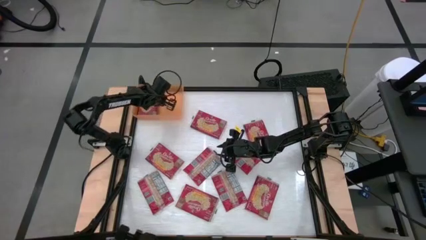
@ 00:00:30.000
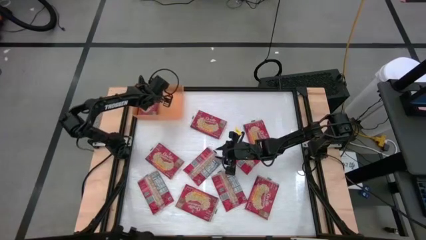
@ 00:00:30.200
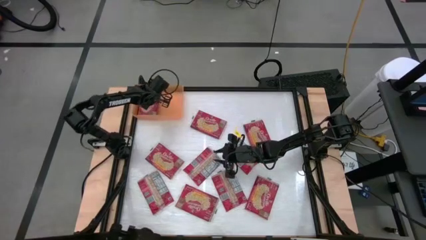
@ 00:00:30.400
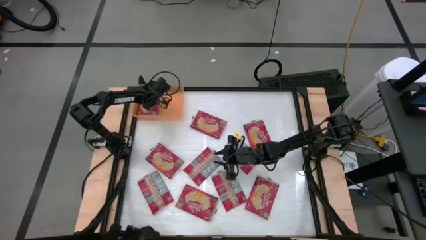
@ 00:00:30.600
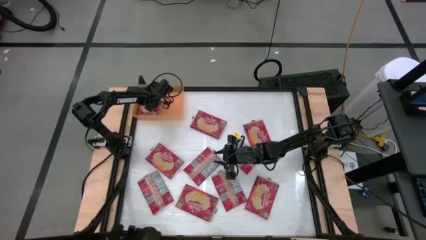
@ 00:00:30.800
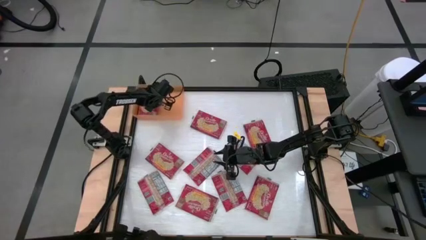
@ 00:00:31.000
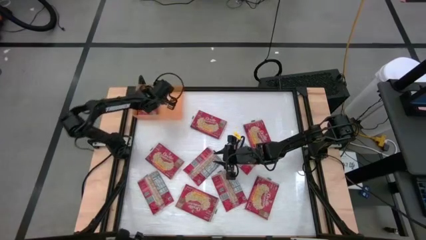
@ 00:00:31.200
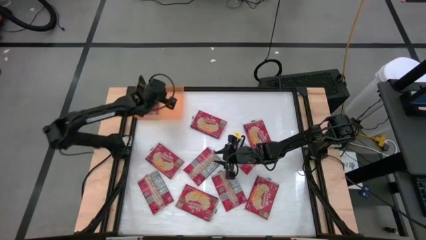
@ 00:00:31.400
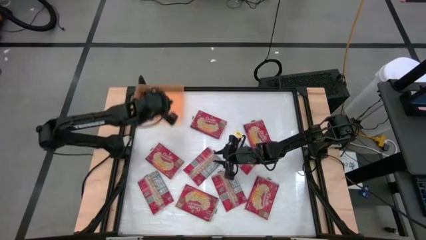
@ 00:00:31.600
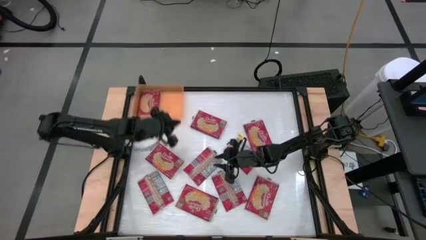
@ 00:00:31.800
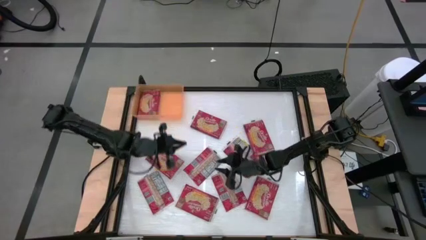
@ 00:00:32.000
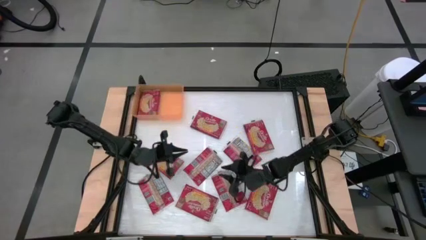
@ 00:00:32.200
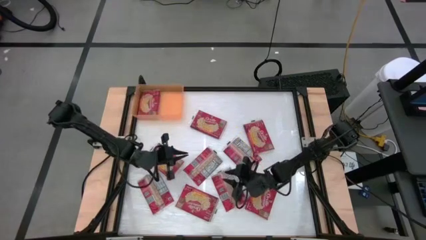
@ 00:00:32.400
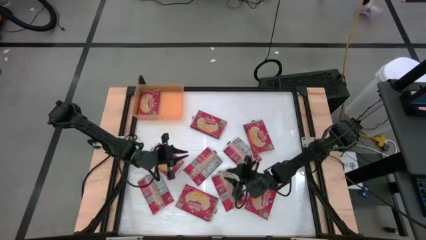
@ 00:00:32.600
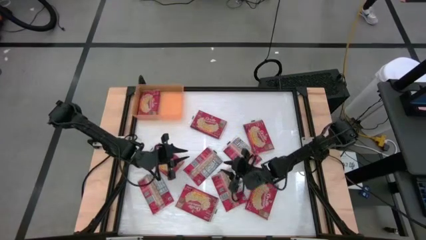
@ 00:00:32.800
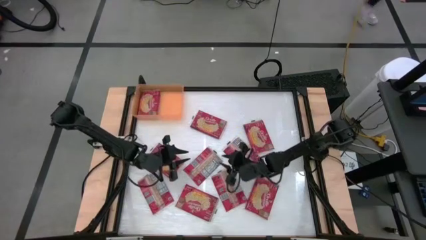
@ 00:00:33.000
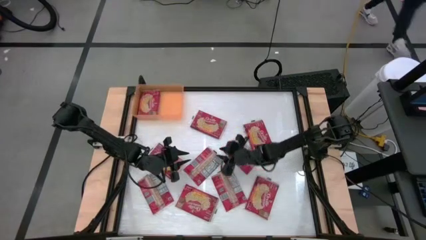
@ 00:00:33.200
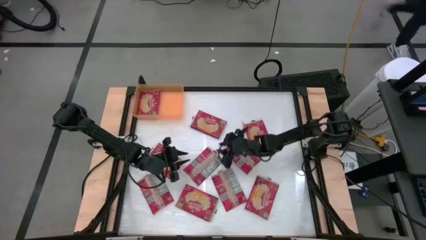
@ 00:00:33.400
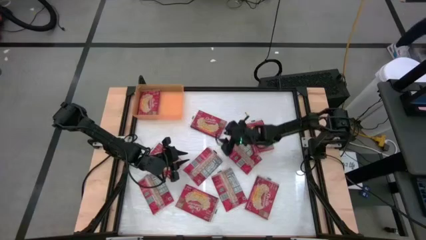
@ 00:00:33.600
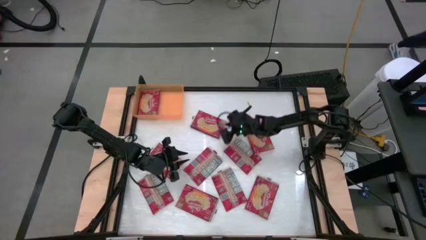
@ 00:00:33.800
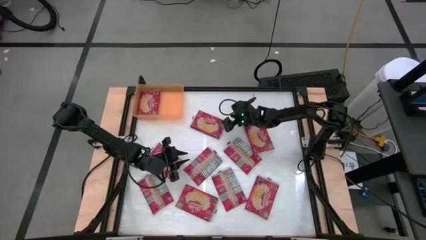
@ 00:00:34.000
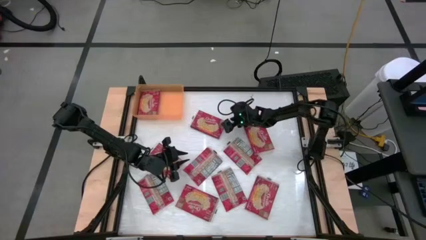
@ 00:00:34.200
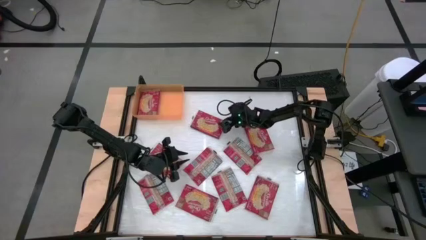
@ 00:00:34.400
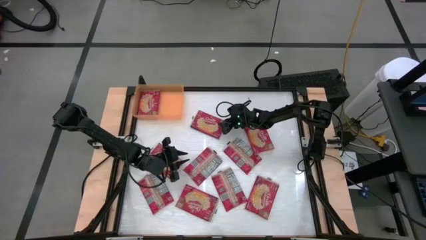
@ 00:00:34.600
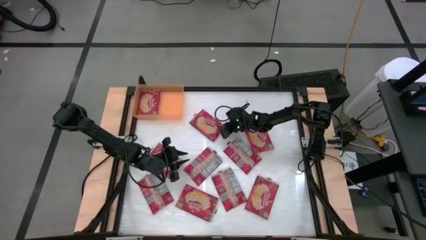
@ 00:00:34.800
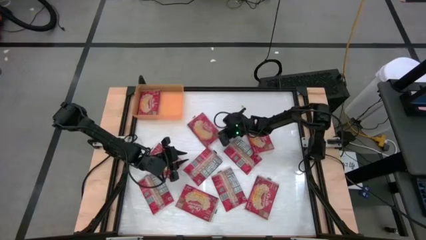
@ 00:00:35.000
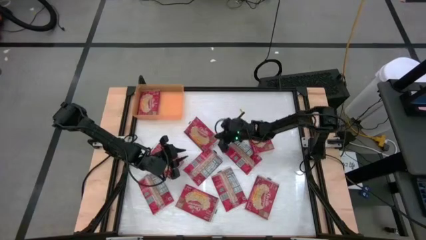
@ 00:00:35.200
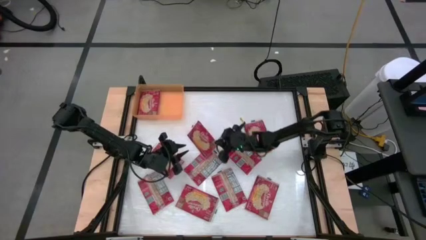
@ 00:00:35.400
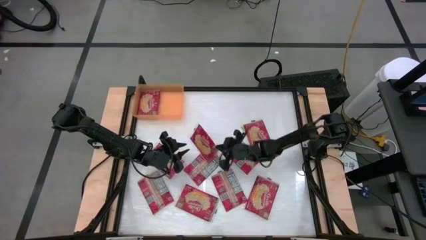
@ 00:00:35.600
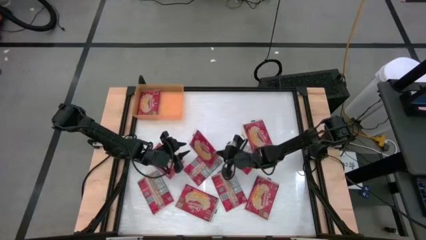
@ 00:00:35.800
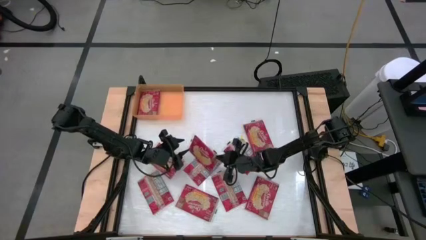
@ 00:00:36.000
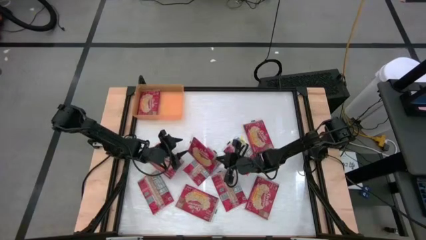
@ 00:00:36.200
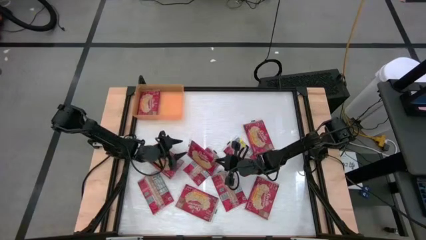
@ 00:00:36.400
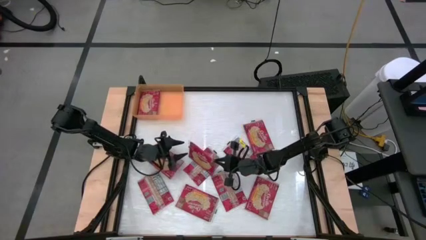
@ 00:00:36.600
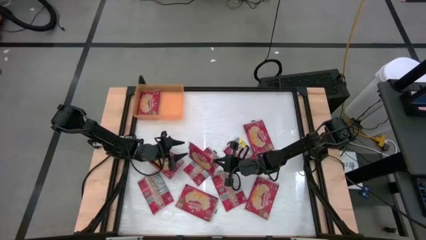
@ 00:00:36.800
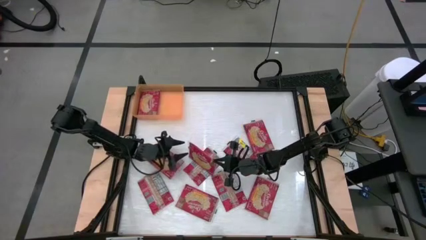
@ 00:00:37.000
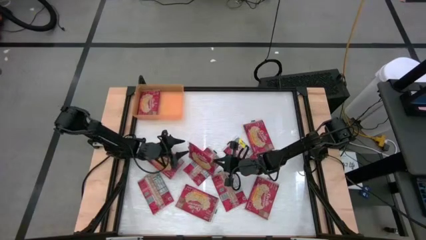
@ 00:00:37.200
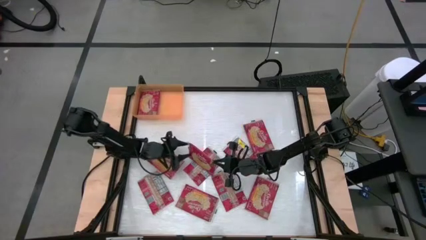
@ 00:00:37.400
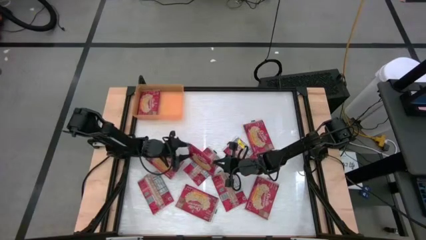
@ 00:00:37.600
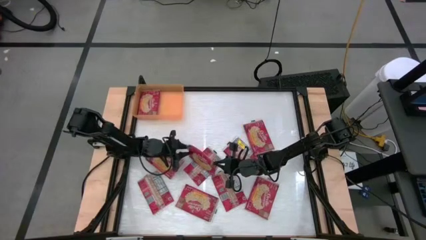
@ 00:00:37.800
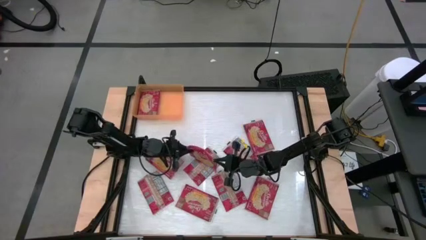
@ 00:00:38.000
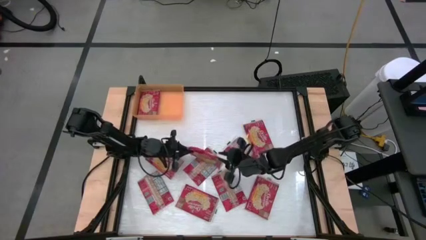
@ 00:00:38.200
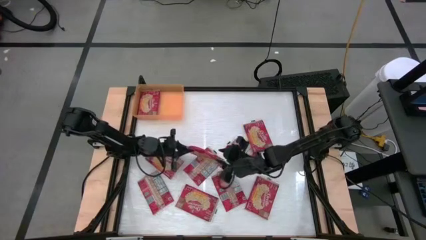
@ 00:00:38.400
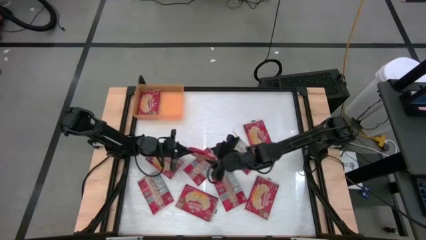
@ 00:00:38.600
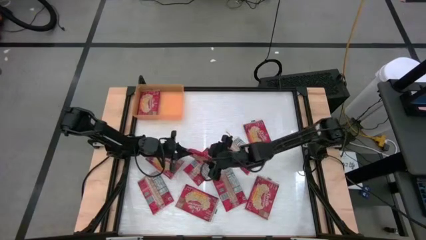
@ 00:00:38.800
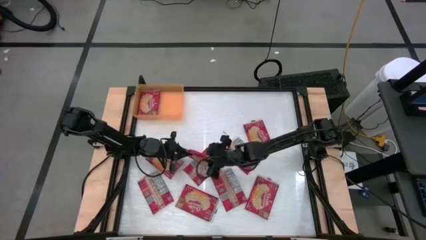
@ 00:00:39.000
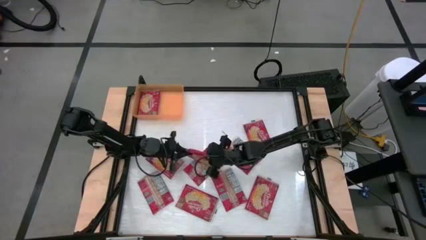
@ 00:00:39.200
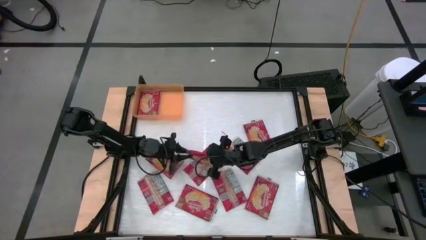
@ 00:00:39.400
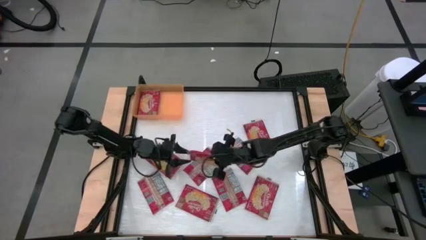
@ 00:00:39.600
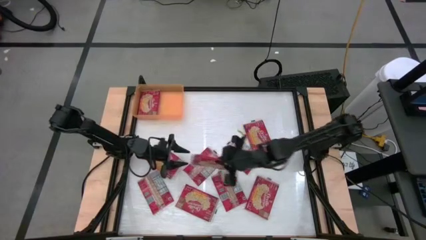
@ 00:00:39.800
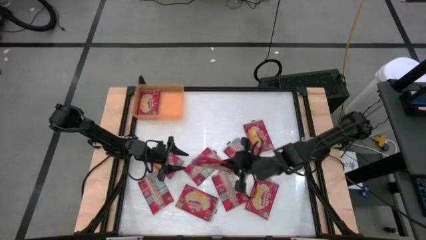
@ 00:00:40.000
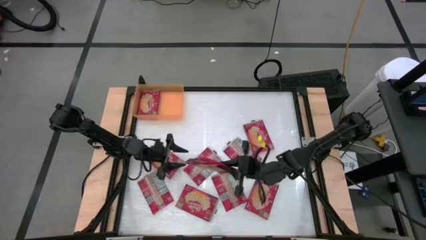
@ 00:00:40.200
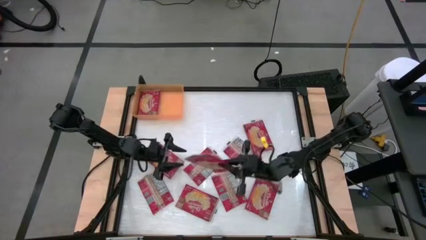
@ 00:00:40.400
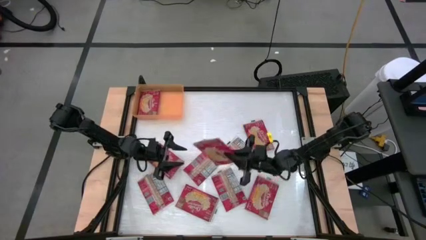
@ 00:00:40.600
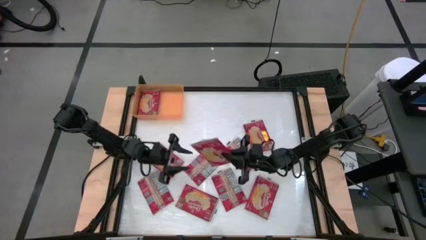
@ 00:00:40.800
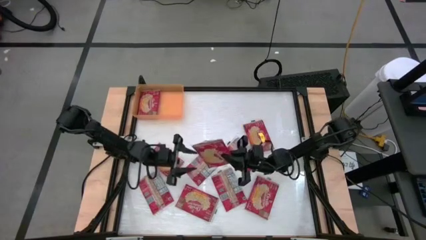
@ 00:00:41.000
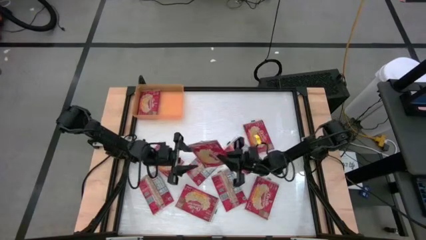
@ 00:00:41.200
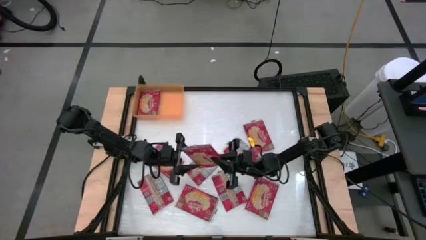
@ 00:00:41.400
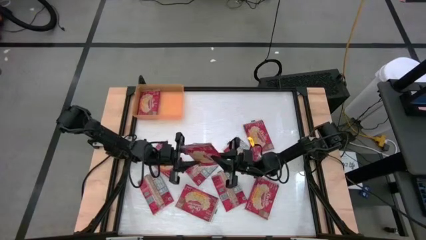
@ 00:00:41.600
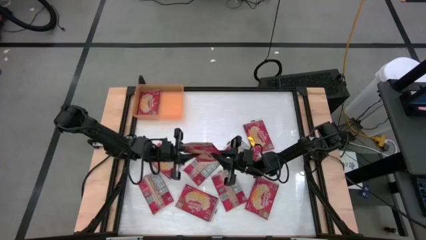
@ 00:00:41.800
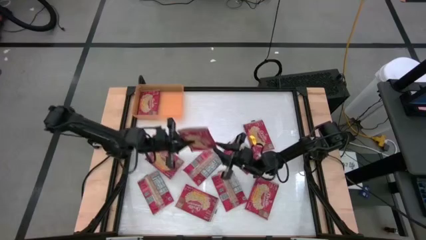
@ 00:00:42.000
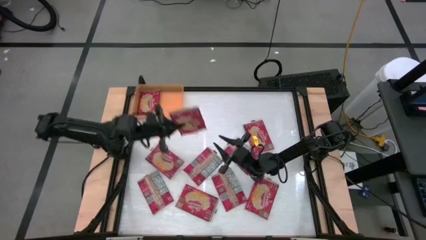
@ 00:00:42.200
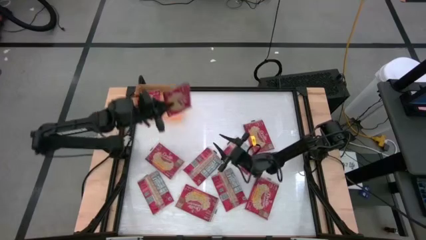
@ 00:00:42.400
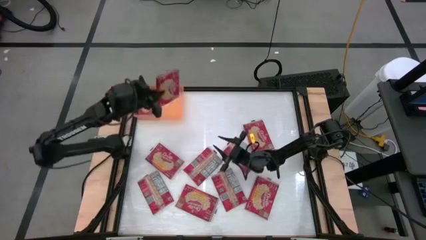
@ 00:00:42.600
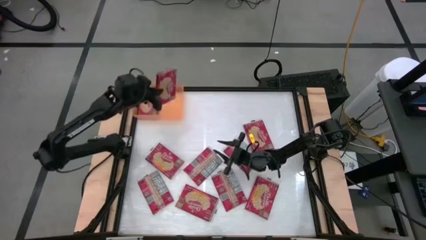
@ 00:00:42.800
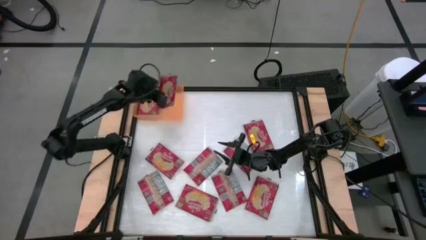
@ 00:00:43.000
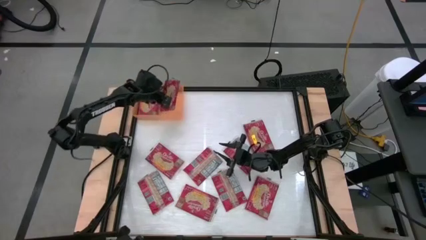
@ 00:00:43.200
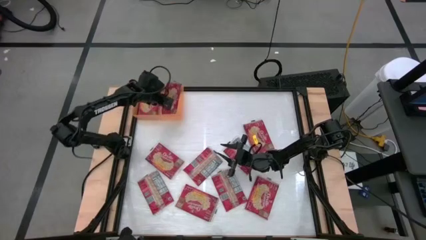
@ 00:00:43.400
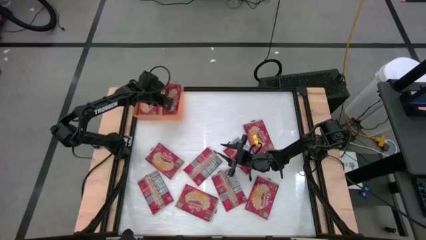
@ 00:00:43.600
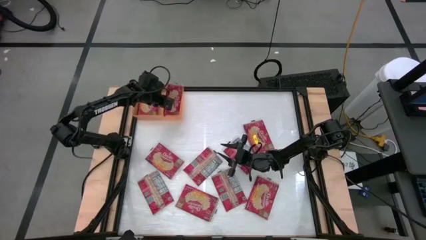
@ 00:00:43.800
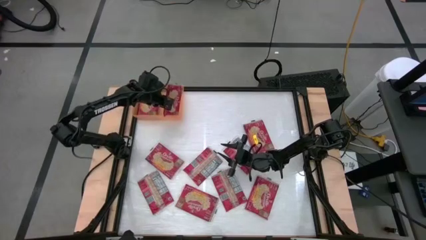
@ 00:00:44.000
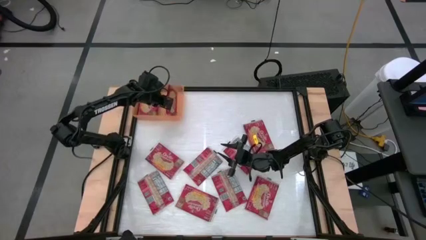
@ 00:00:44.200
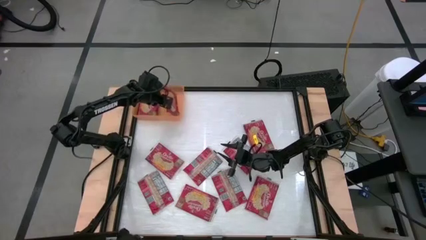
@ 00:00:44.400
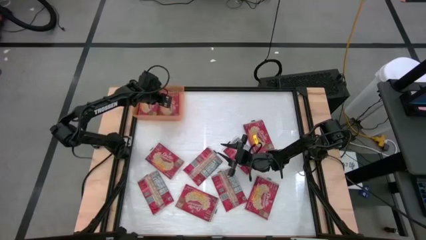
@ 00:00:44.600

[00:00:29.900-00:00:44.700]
Task: Sort popcorn bags into baskets
Put the red popcorn bag into the orange bin
